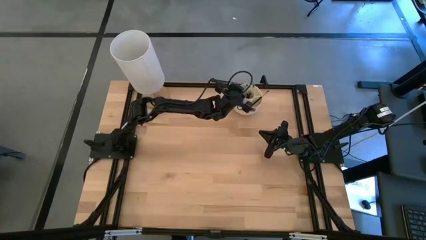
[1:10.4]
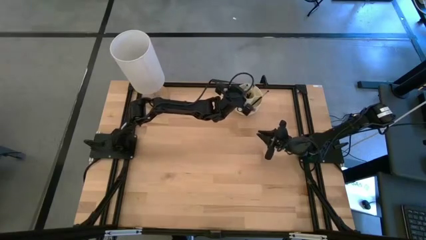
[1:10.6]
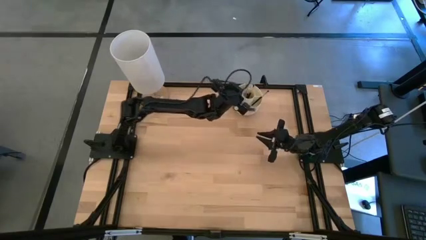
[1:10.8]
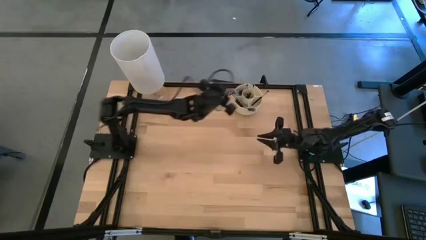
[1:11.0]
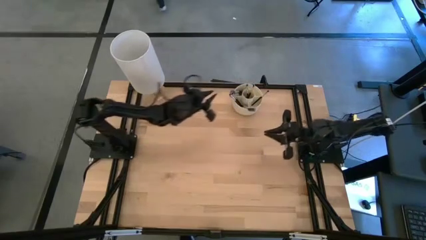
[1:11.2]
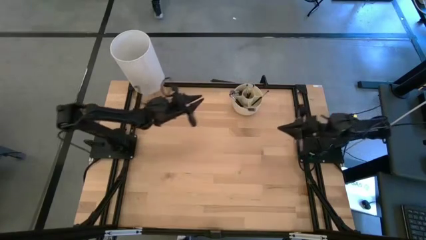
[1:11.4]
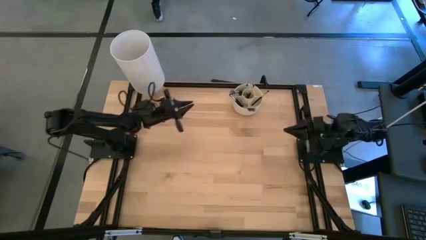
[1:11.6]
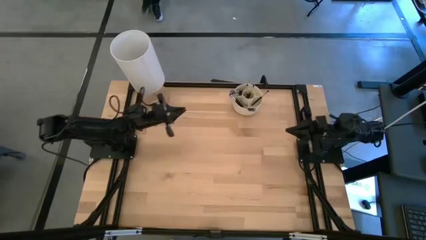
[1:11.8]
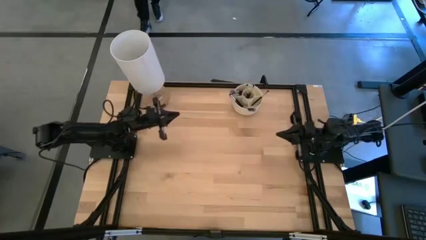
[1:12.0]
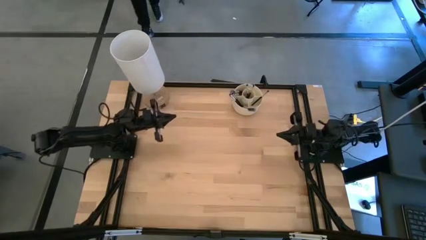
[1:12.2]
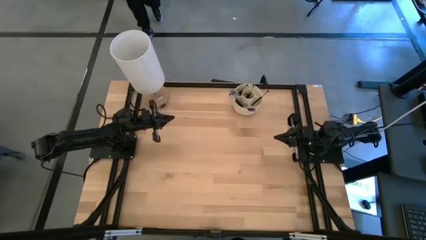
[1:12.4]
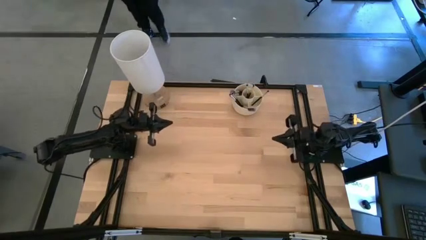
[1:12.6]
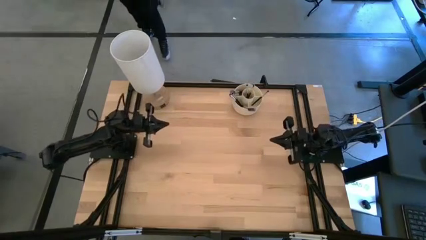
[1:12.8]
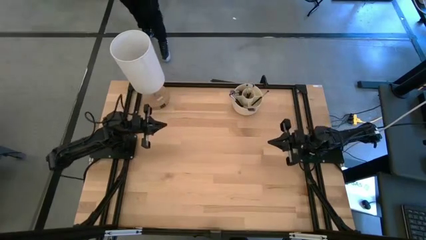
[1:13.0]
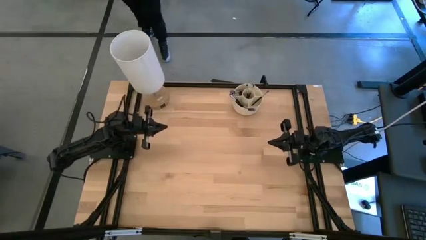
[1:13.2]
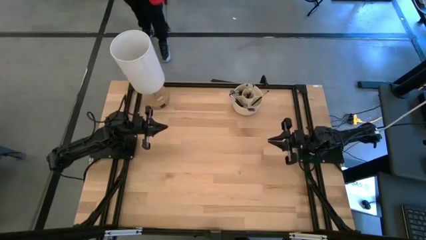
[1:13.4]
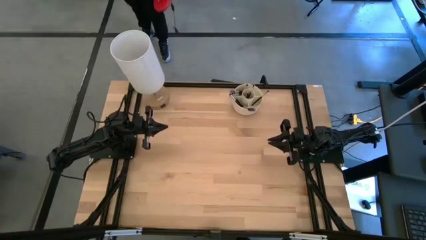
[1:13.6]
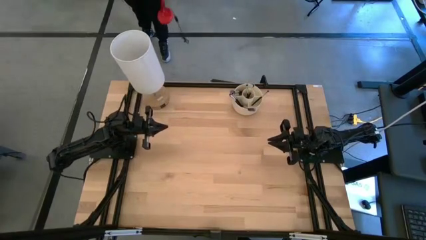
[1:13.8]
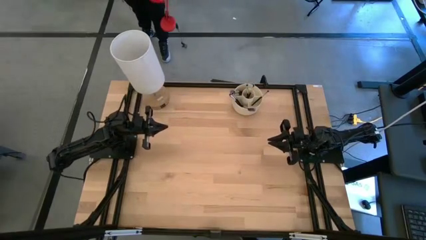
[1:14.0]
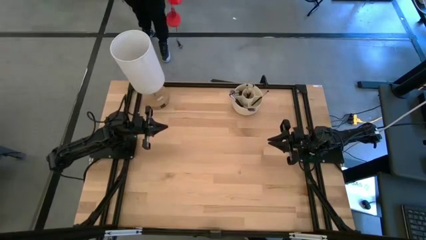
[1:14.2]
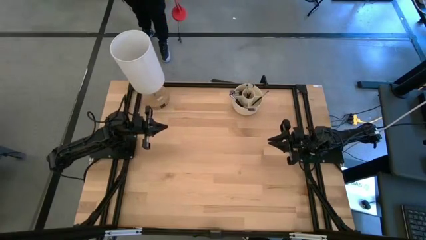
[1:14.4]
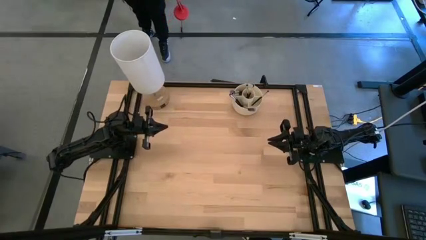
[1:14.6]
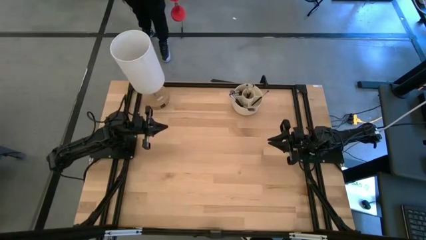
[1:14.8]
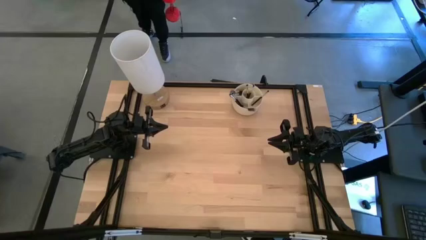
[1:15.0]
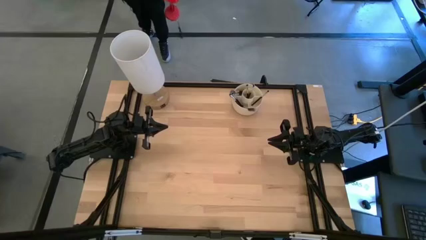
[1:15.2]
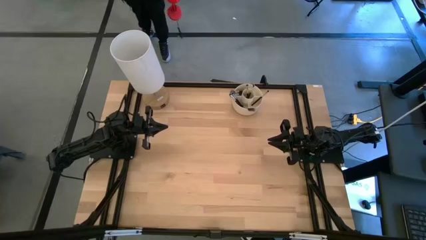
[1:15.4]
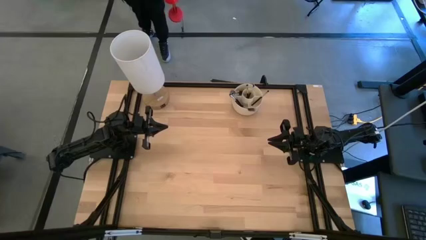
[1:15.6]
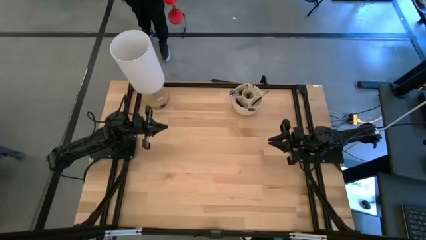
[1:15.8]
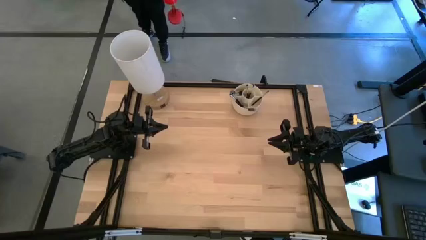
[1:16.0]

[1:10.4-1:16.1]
Task: Sort items
Return to Home Position

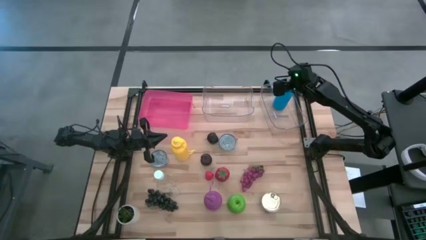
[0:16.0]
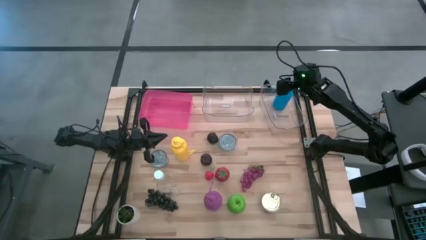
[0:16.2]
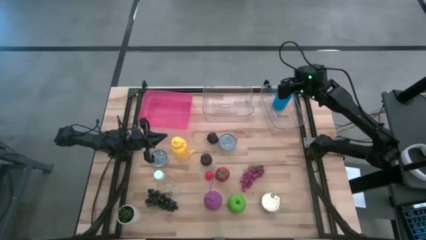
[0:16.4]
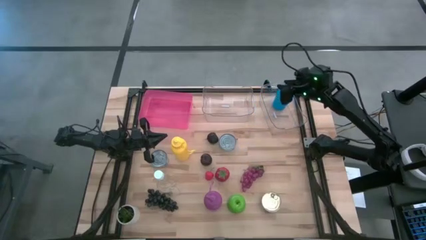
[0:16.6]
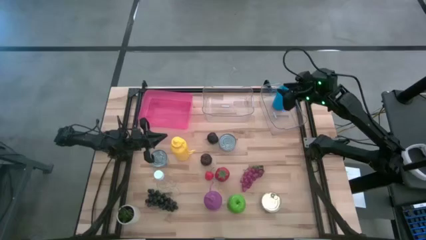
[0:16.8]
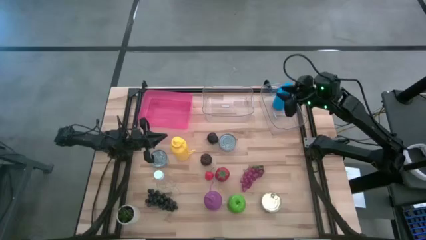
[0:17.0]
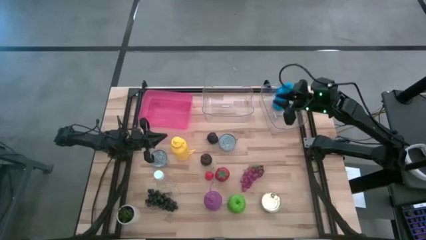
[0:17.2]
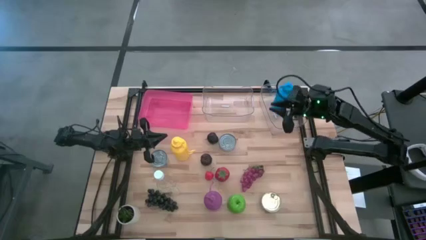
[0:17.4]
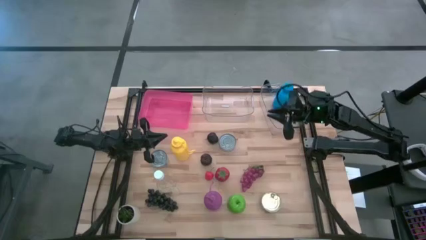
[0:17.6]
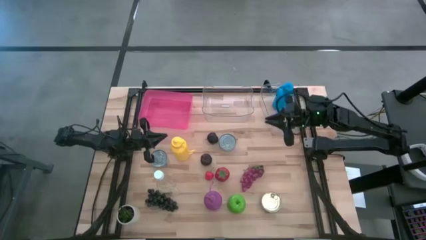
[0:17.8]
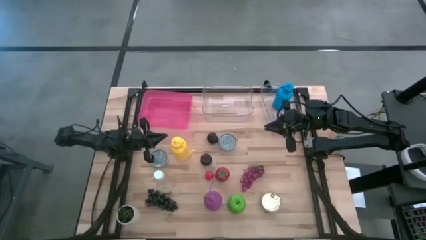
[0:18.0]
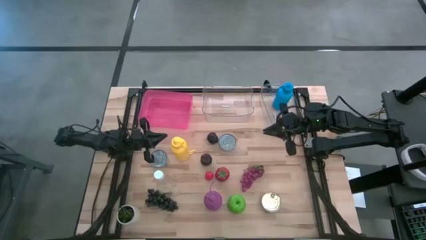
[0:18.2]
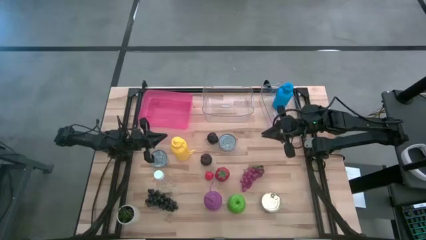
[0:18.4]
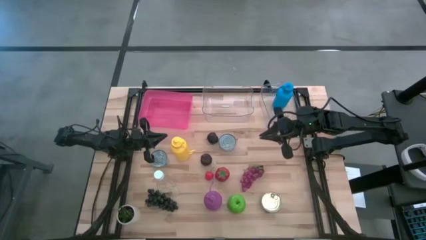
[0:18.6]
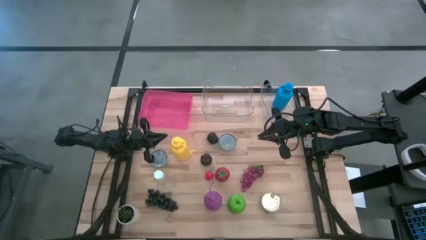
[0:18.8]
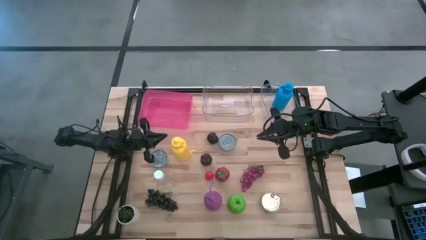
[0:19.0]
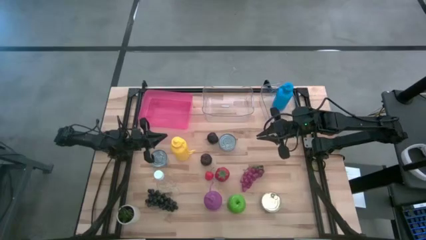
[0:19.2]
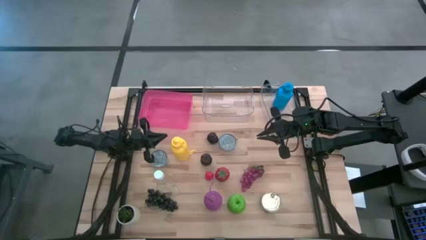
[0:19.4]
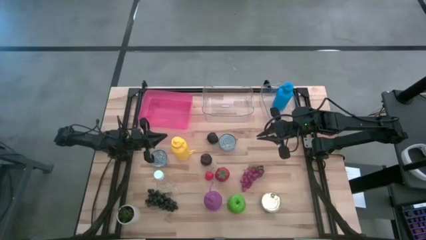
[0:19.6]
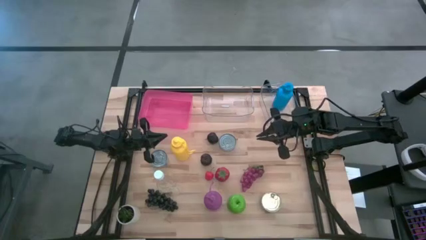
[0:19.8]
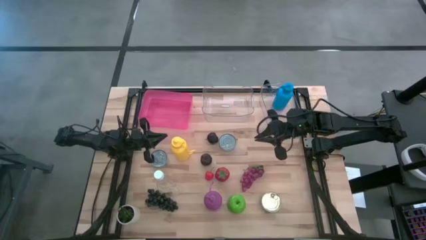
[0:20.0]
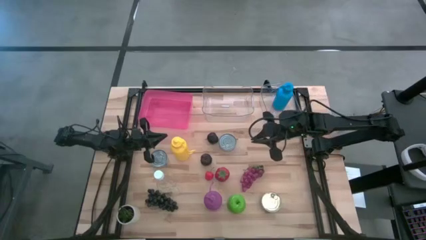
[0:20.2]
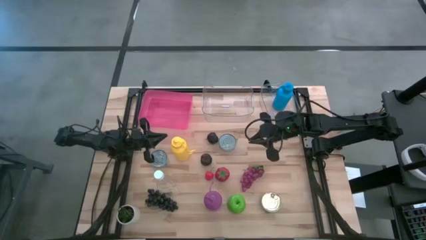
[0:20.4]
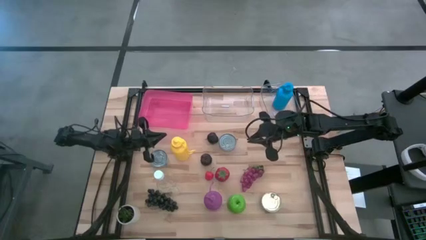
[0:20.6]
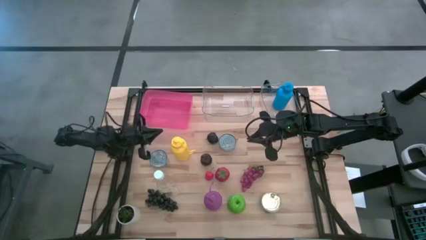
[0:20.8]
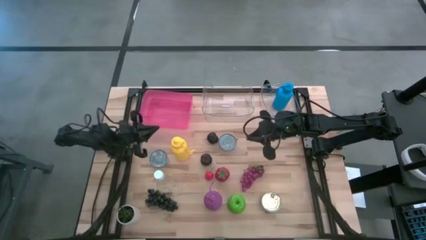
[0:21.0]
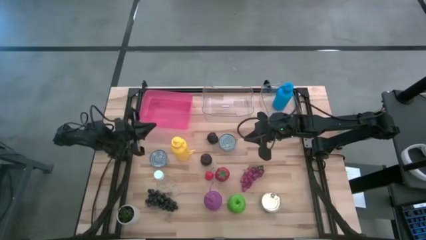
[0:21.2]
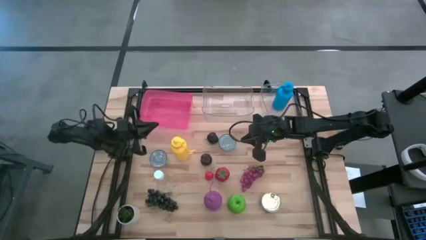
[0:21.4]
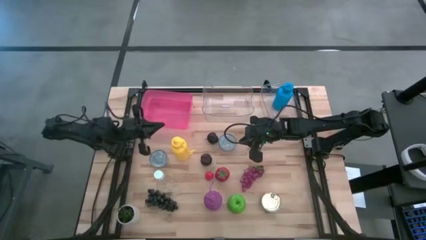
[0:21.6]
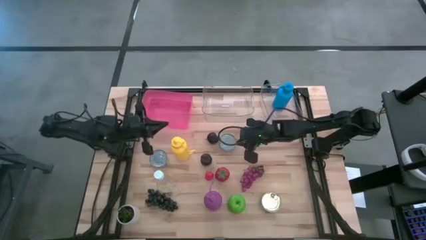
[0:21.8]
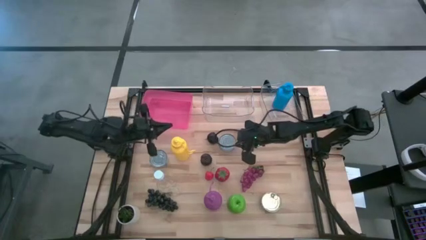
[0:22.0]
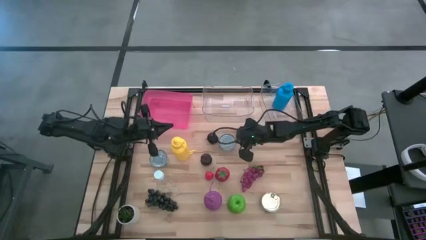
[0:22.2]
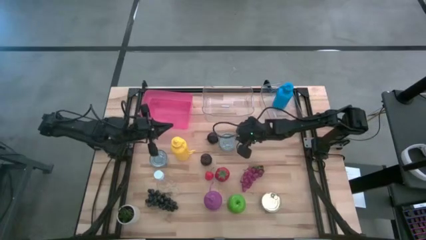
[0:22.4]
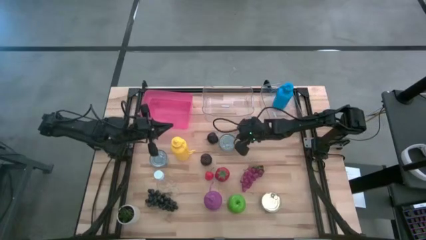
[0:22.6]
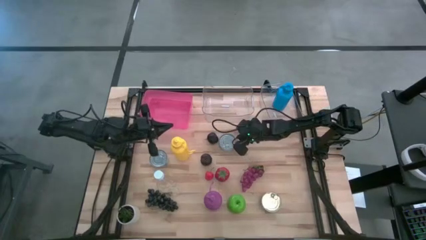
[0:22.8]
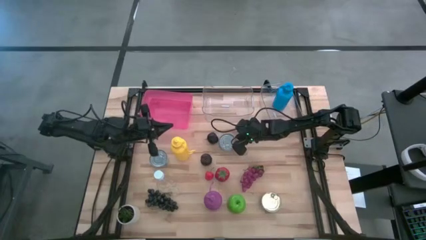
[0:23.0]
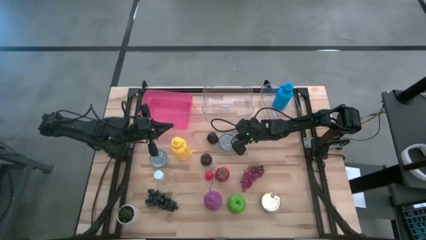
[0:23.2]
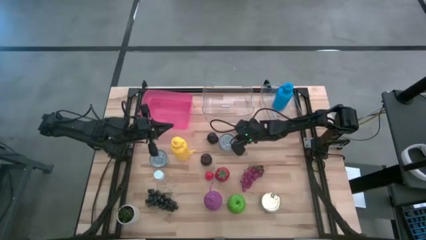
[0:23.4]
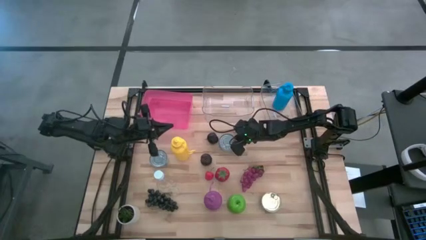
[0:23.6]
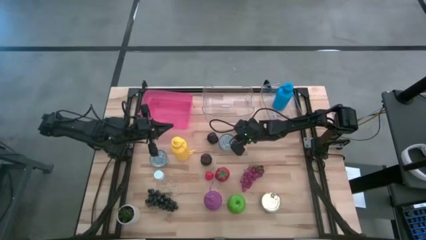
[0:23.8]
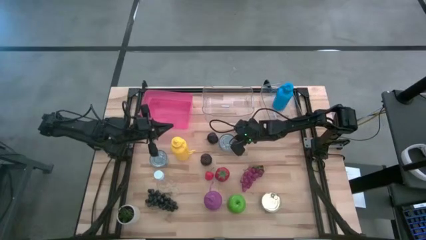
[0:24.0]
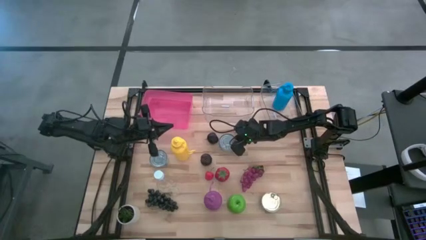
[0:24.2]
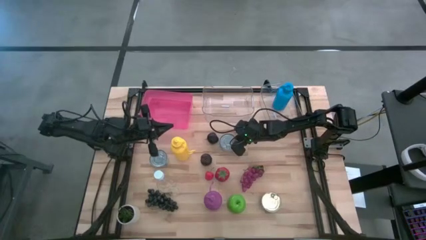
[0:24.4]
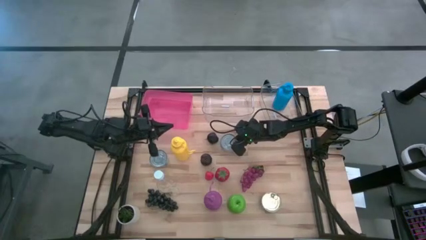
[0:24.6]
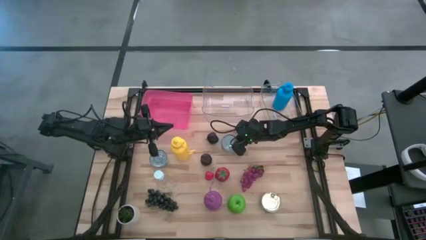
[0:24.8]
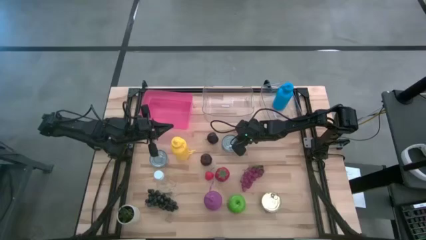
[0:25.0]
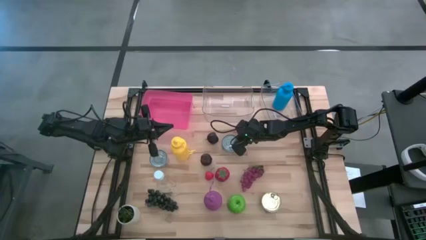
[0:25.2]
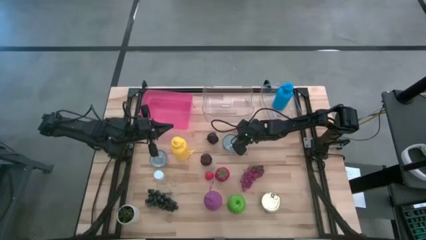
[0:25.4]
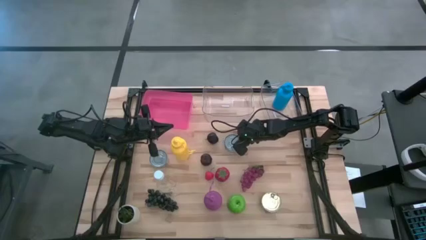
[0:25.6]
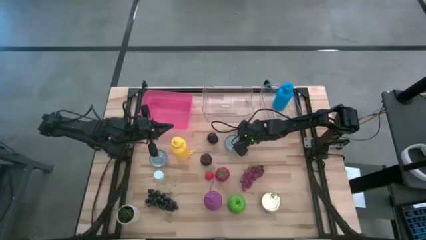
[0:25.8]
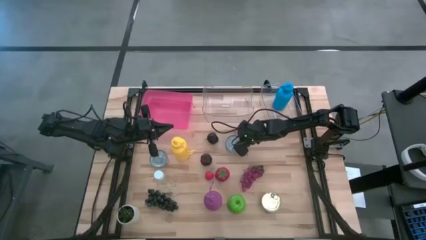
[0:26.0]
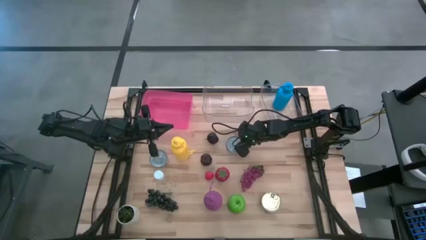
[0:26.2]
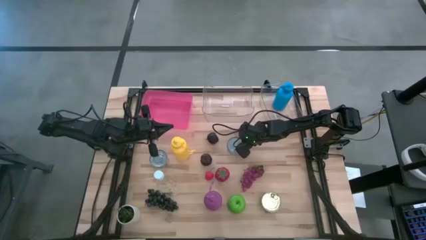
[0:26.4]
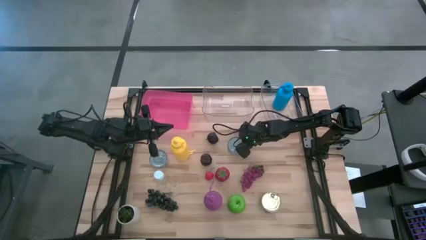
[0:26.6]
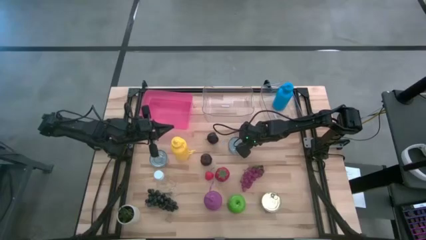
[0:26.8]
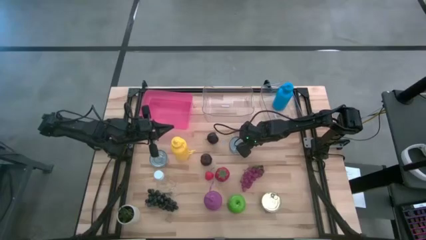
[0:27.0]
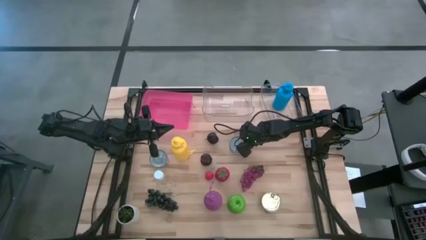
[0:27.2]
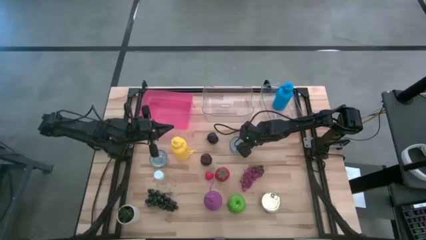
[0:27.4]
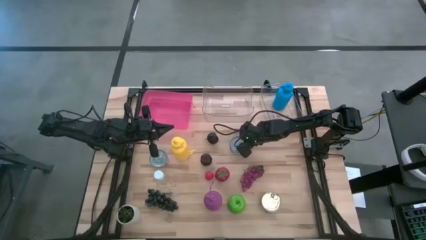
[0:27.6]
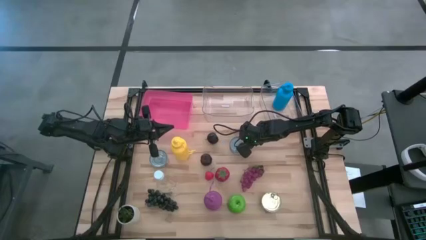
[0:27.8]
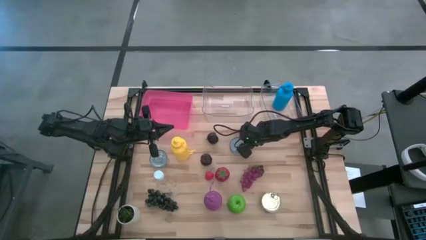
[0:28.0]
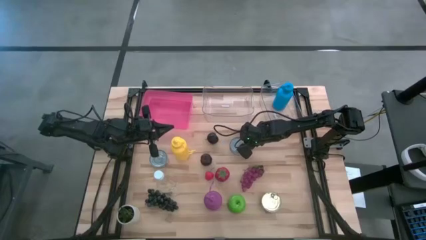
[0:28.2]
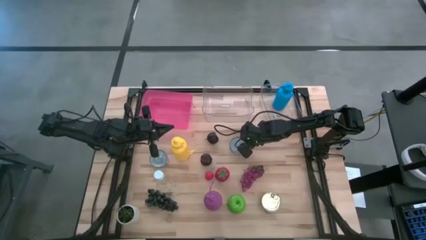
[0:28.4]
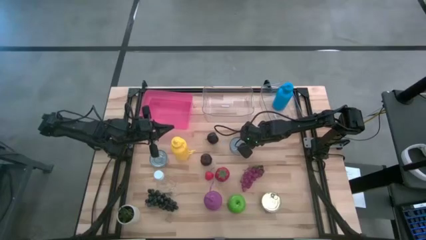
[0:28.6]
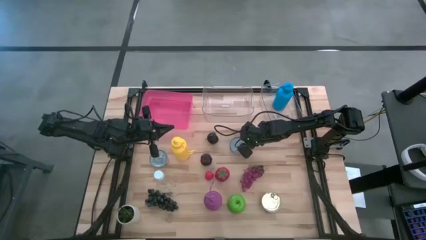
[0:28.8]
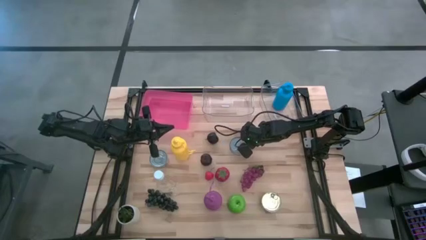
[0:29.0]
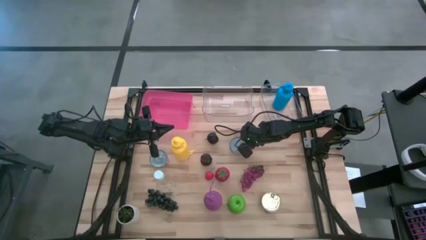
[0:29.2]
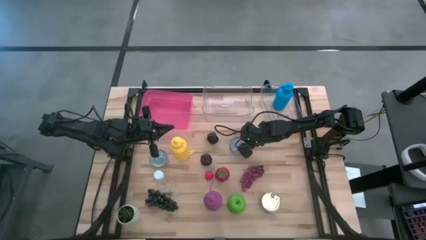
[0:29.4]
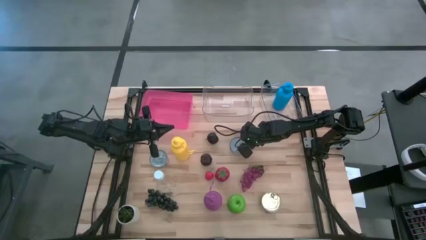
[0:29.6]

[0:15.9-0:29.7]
Task: Pick & Place Food Item
Put the dark blue tuna can into the left transparent bin
